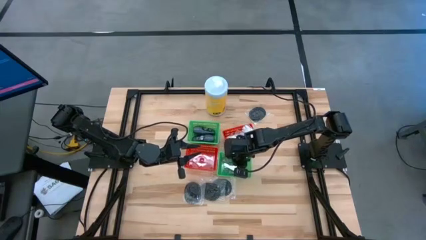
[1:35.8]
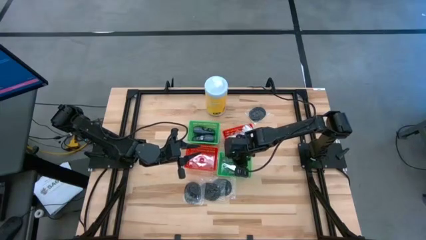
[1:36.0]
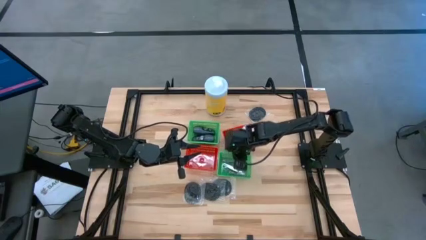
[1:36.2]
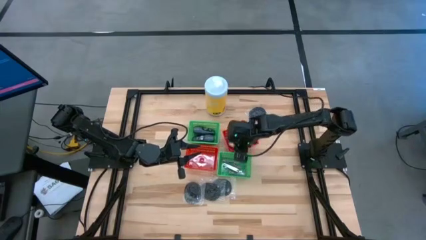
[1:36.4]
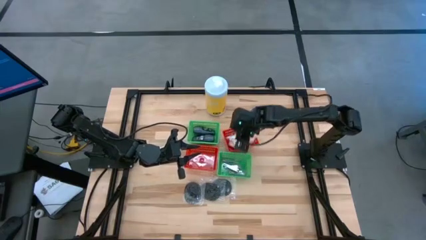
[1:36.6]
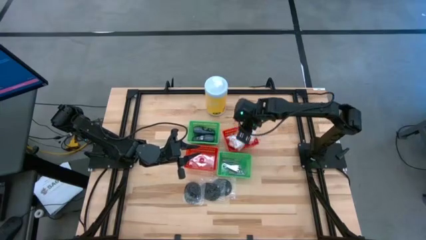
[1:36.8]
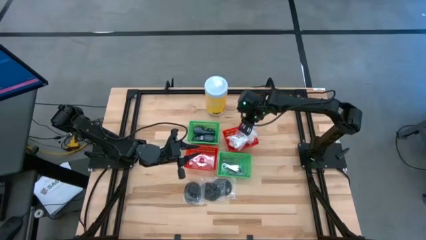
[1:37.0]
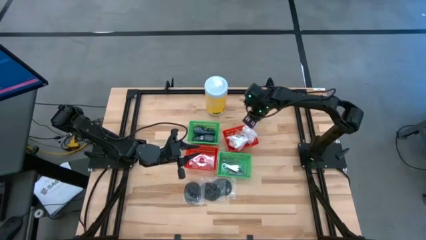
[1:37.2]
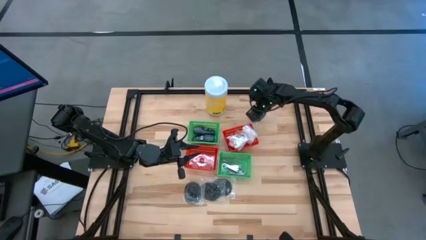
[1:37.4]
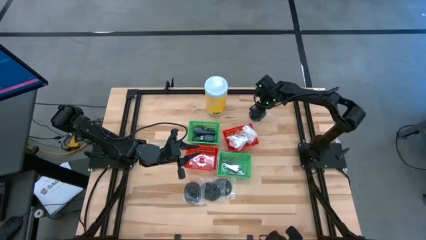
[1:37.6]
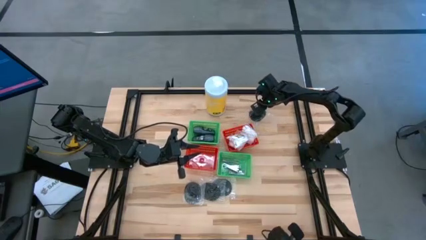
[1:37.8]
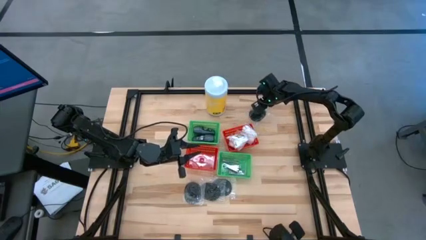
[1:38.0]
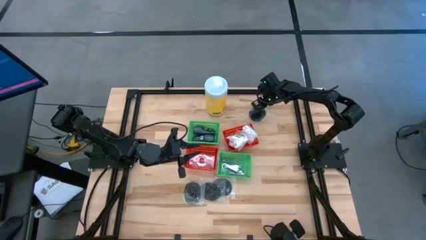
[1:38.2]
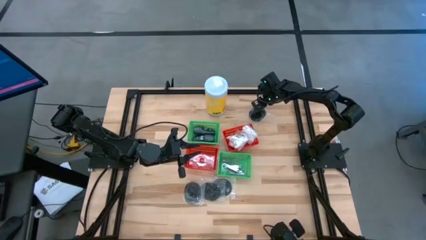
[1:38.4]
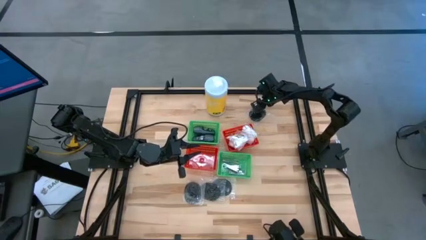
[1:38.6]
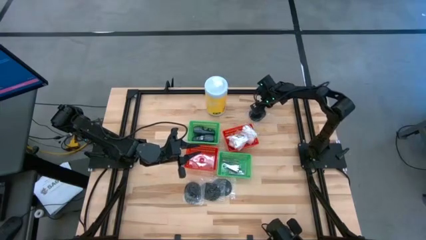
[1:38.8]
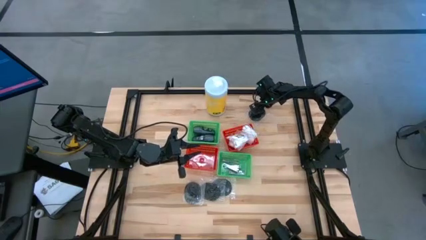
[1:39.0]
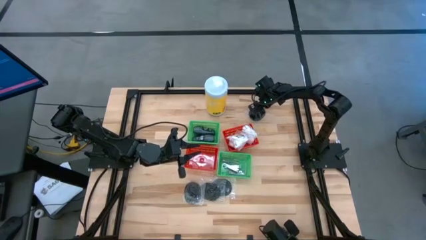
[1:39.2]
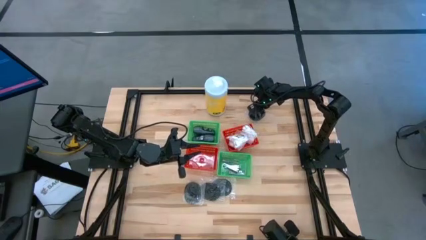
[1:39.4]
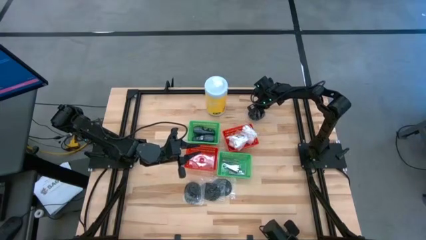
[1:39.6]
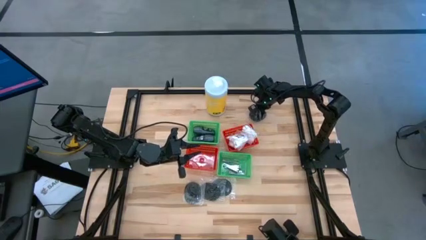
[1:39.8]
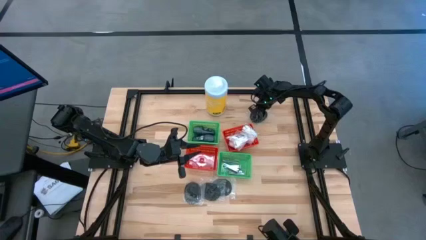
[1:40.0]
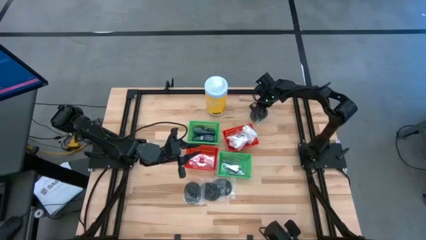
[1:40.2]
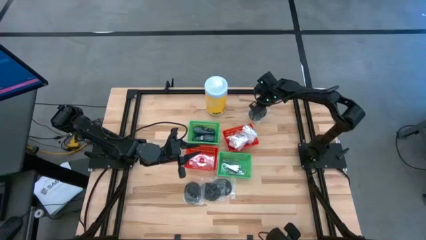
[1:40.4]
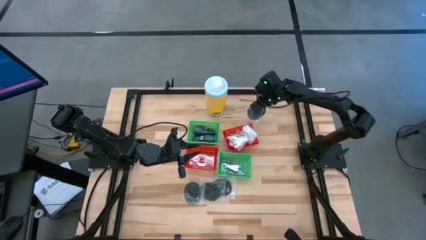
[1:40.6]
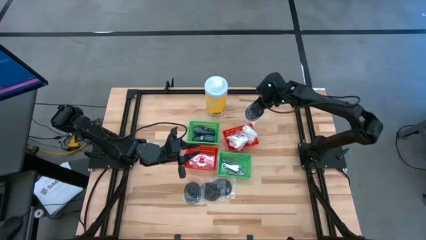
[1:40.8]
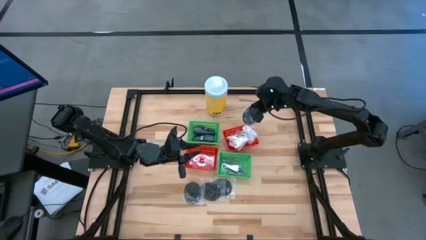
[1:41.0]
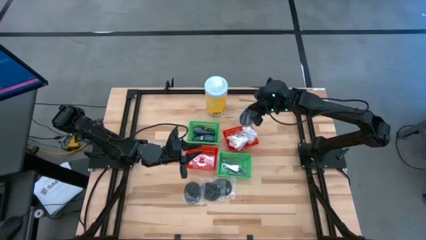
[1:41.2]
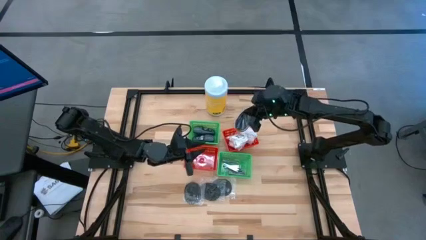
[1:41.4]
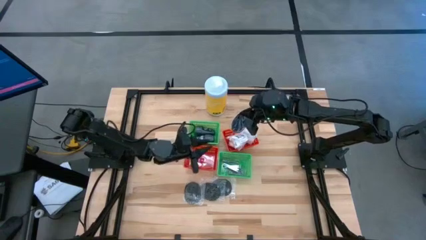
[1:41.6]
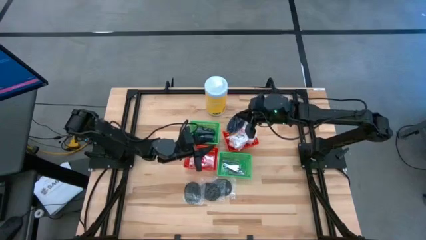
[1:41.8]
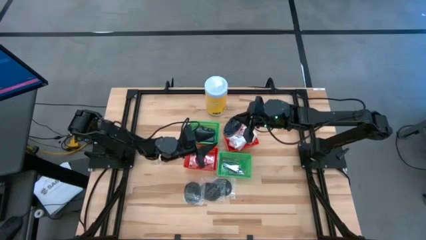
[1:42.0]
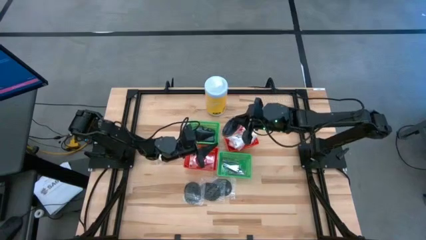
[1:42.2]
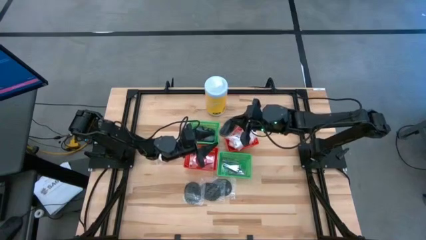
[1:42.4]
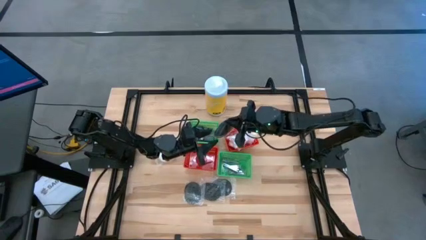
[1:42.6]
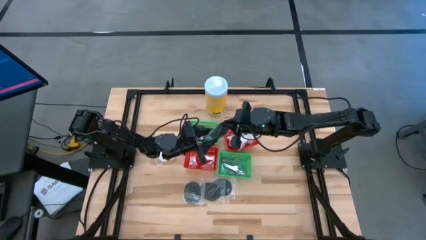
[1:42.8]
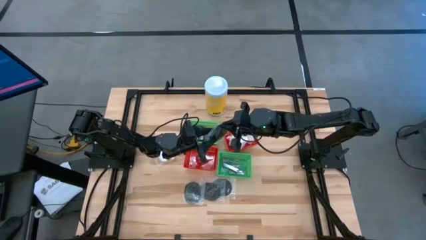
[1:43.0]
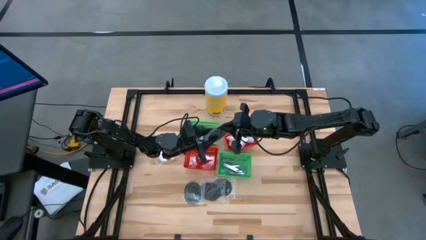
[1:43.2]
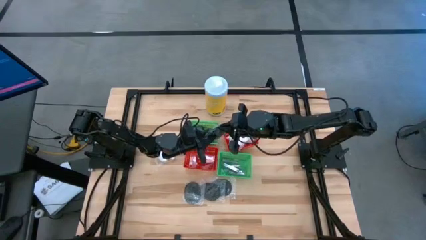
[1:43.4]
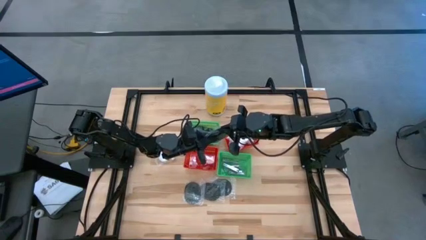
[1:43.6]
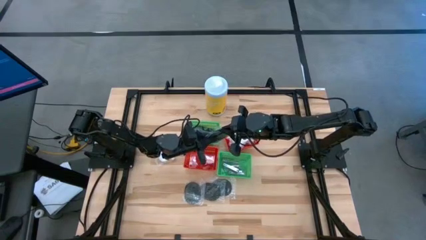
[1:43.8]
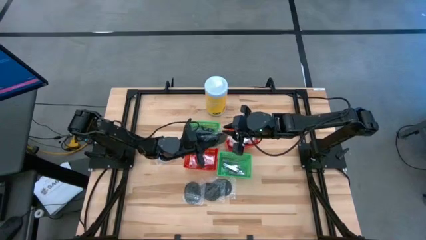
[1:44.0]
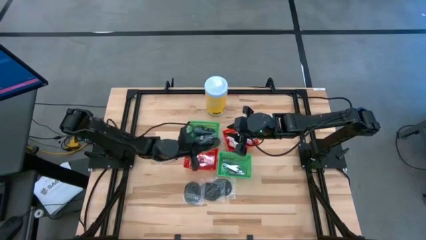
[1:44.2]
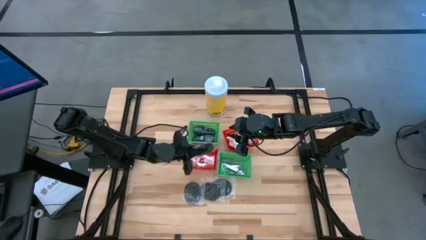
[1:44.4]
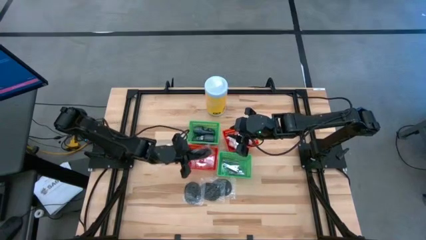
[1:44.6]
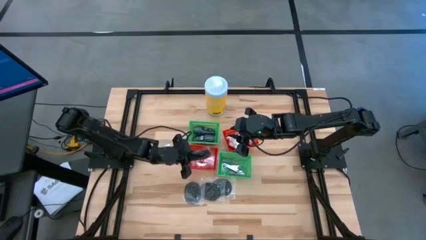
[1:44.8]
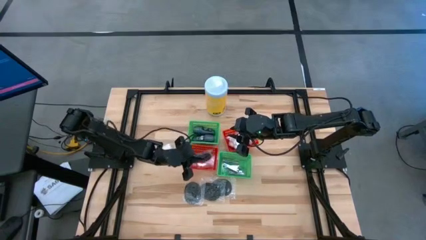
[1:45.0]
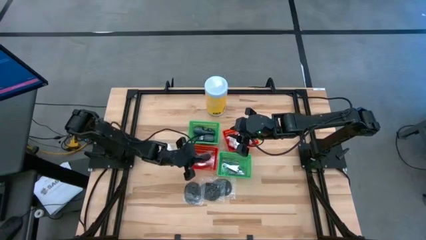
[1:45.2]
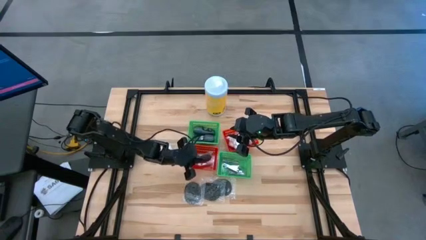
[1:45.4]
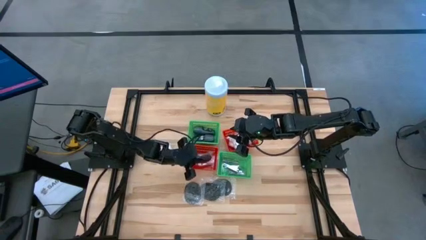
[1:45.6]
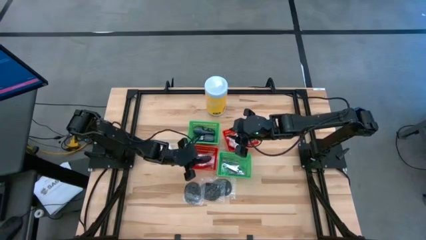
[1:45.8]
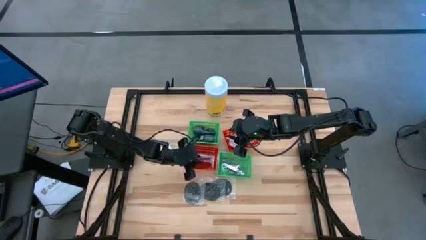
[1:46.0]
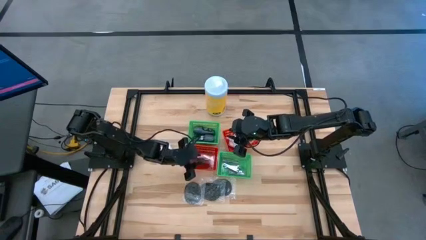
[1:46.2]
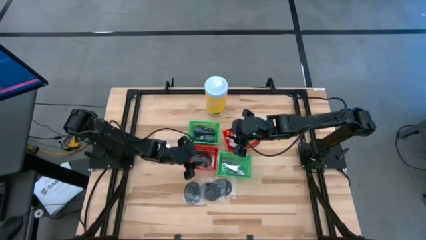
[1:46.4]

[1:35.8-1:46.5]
Task: Pick & Place Travel size toiletries
Put the hairbrush into the left red bin

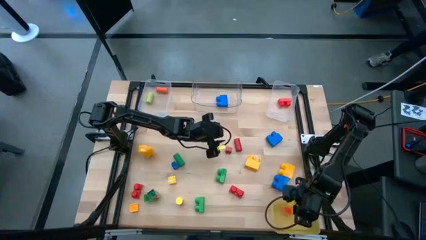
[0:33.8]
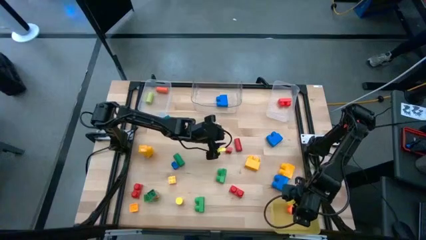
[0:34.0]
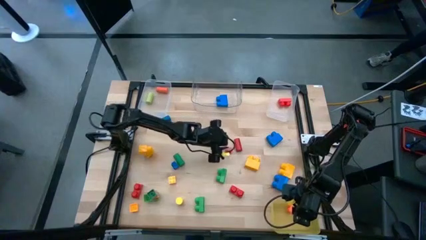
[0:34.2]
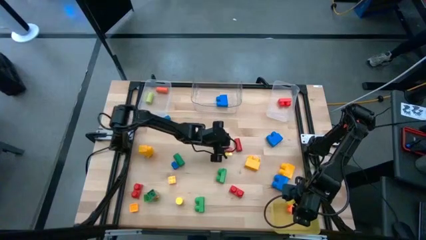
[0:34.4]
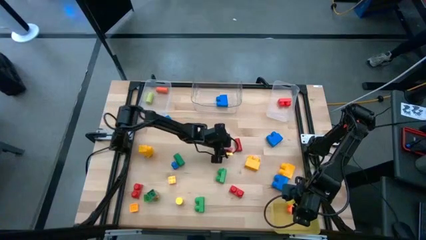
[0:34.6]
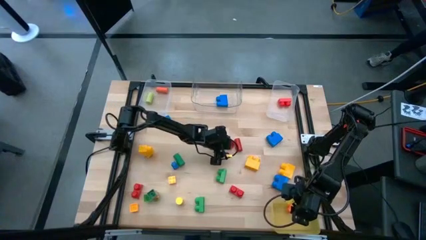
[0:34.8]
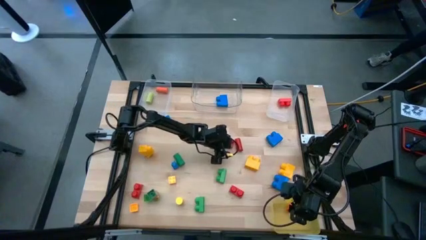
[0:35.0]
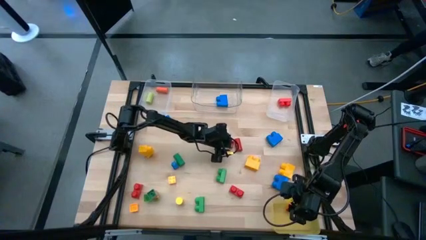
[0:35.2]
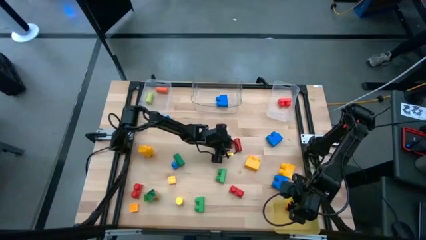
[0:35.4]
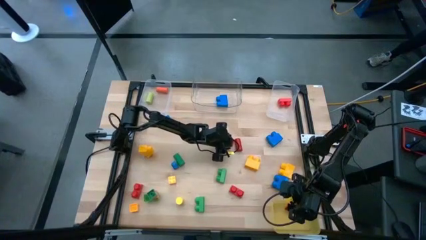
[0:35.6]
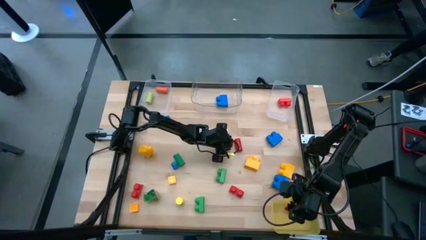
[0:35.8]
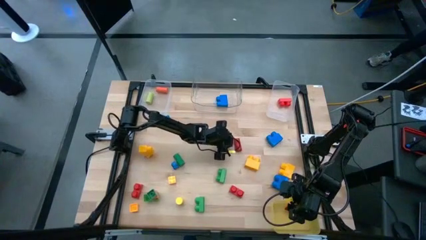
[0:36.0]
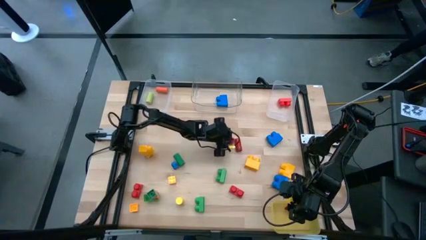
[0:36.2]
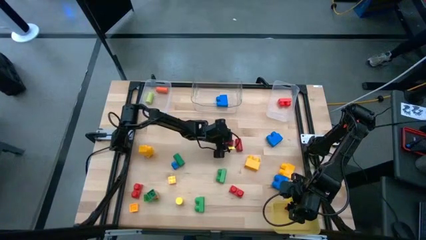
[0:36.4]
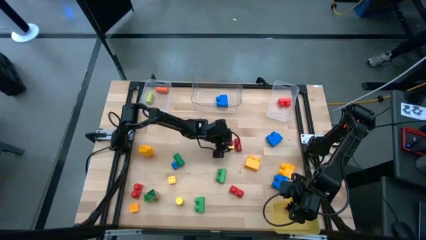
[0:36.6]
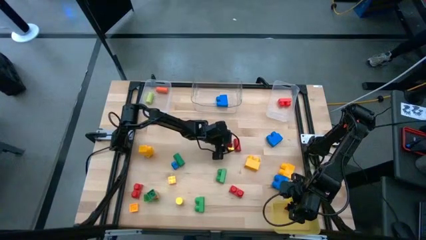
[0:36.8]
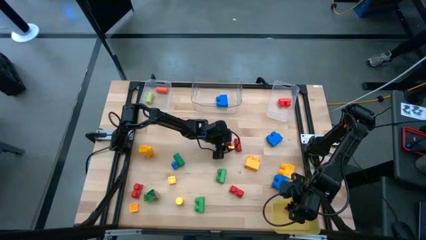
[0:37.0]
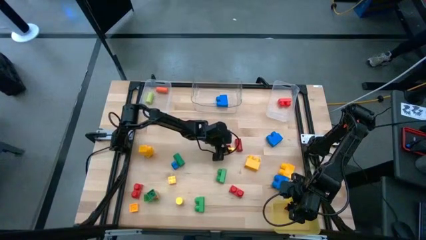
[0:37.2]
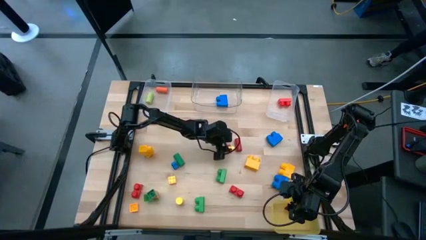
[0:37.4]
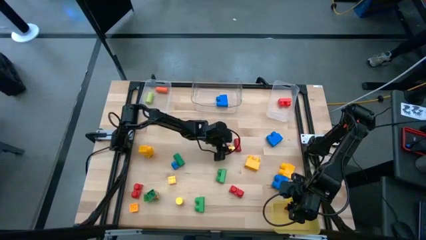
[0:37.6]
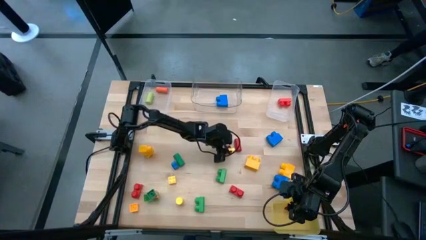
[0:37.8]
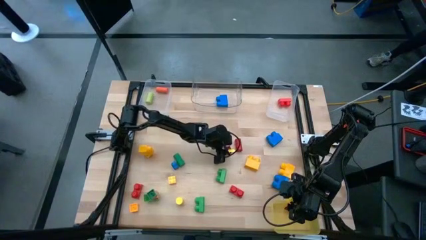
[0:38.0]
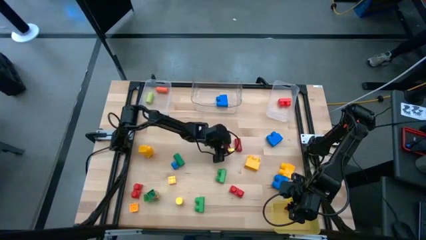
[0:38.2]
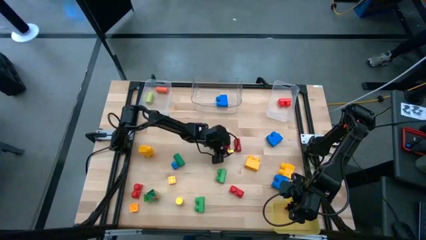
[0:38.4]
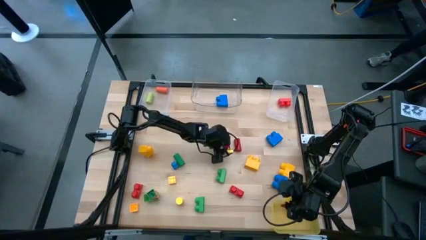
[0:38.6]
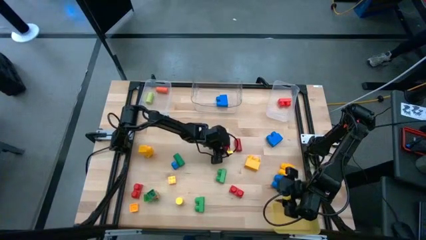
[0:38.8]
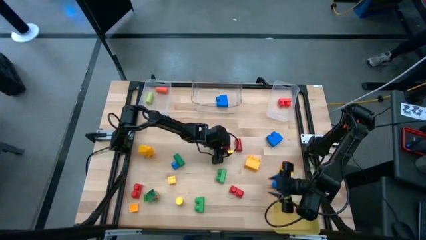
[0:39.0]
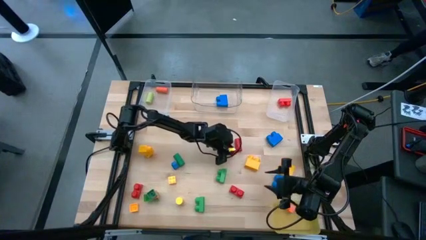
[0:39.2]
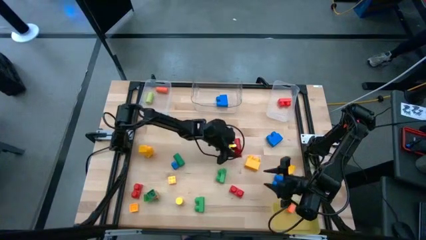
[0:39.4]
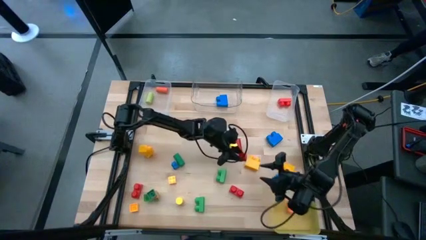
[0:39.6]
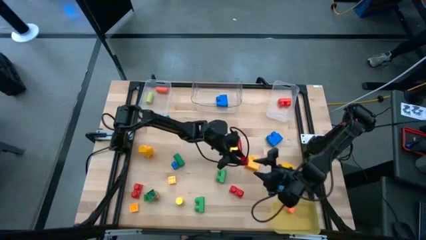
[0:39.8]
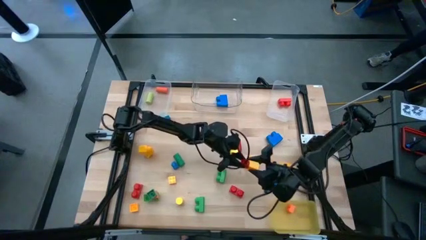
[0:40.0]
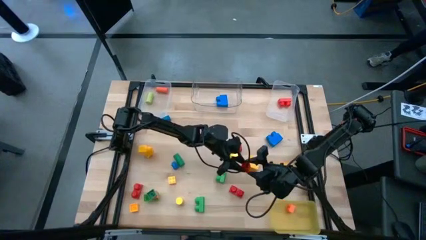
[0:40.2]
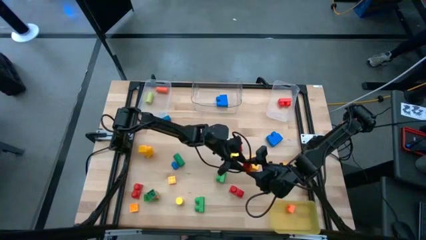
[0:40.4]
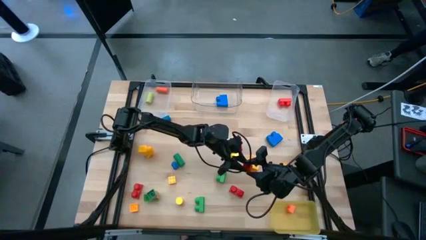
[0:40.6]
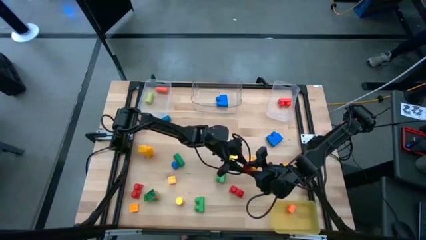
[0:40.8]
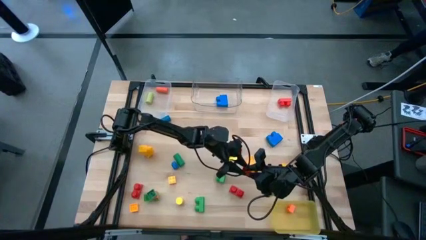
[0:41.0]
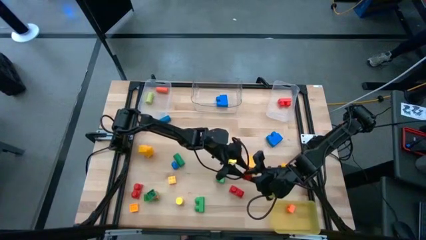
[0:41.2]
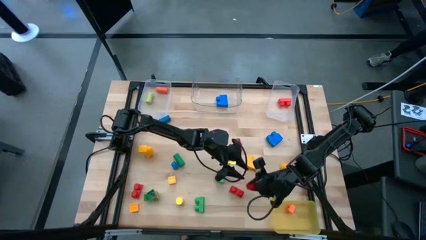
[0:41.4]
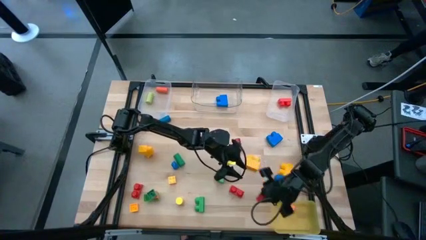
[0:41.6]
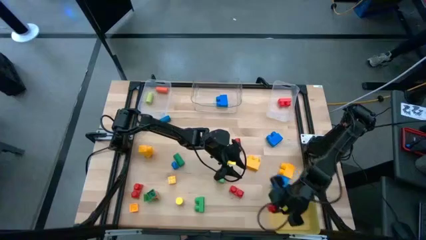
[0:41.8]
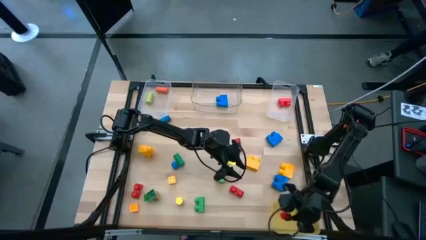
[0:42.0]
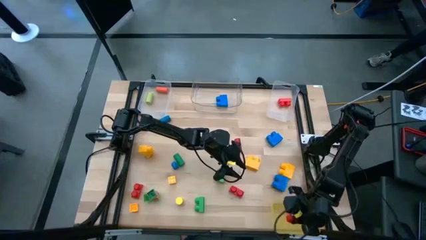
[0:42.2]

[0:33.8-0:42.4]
Task: Sort blocks by size
Put the red game piece into the yellow bin
